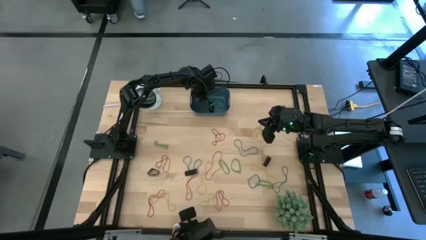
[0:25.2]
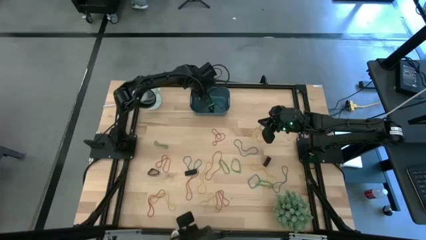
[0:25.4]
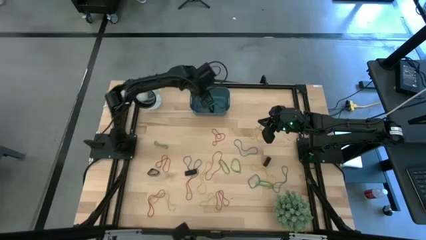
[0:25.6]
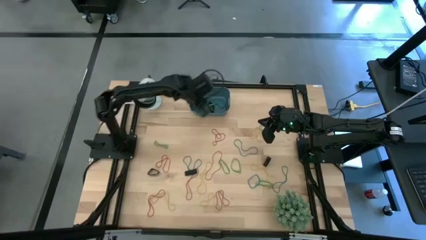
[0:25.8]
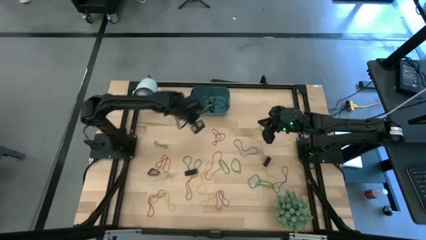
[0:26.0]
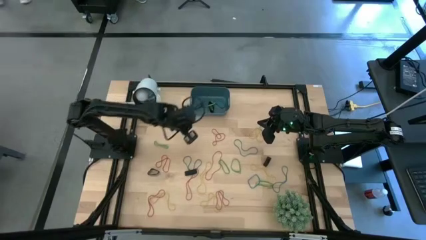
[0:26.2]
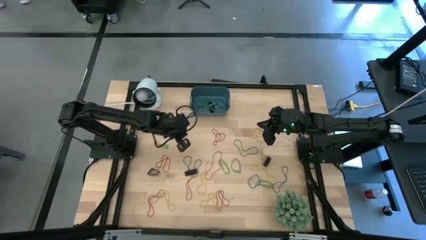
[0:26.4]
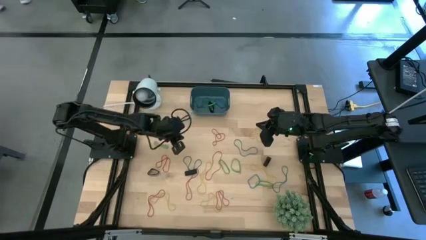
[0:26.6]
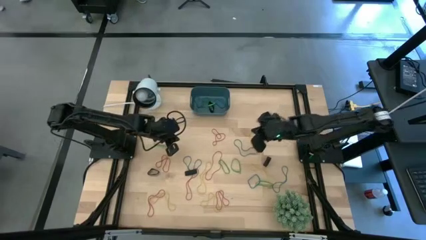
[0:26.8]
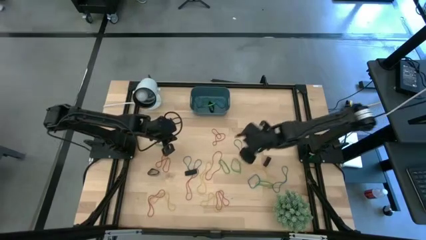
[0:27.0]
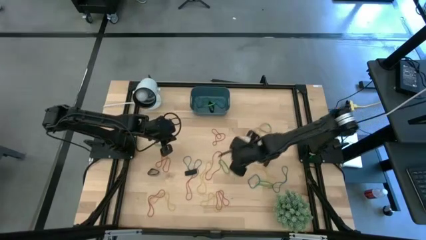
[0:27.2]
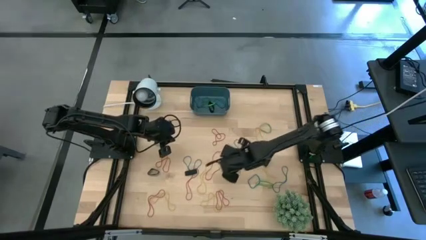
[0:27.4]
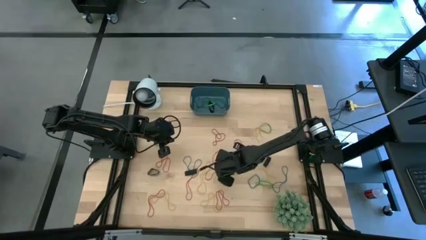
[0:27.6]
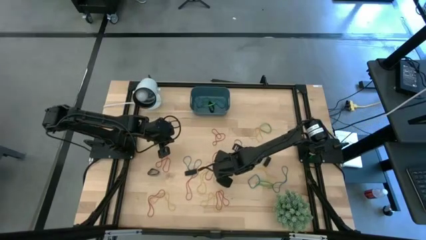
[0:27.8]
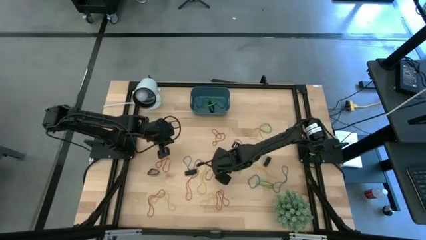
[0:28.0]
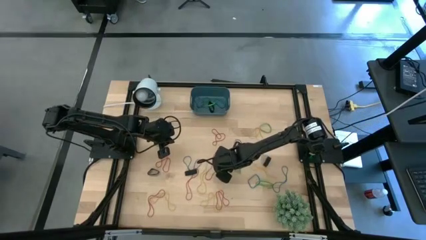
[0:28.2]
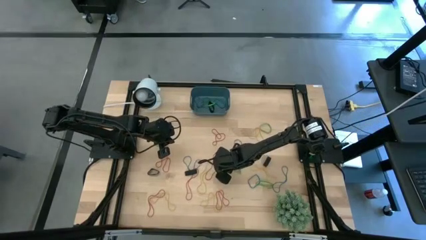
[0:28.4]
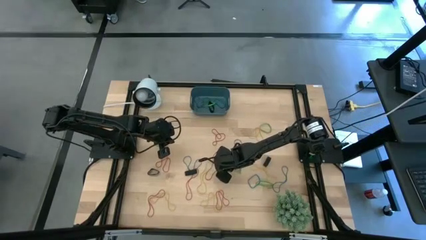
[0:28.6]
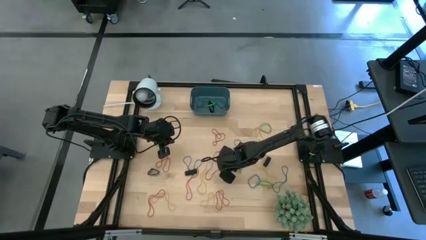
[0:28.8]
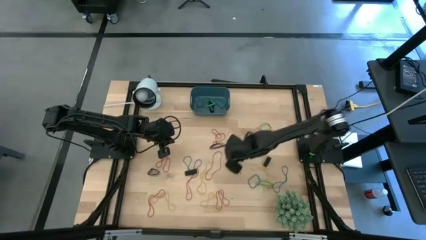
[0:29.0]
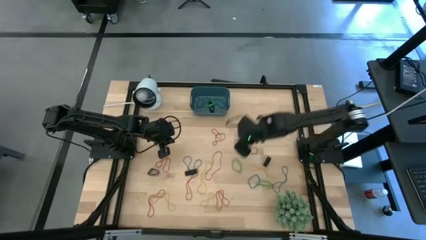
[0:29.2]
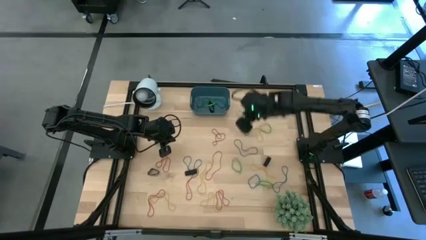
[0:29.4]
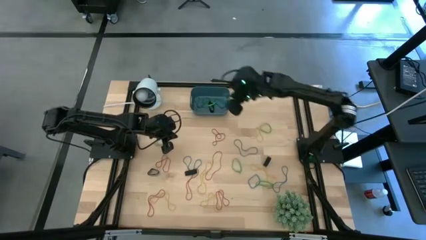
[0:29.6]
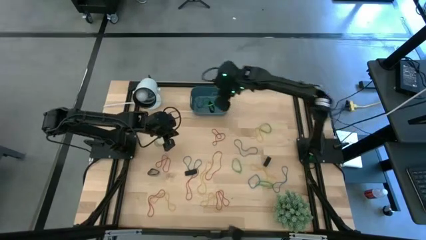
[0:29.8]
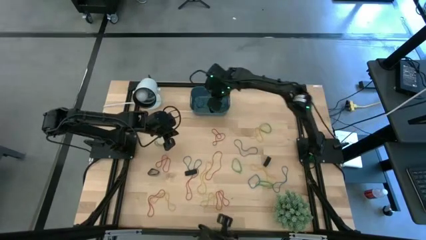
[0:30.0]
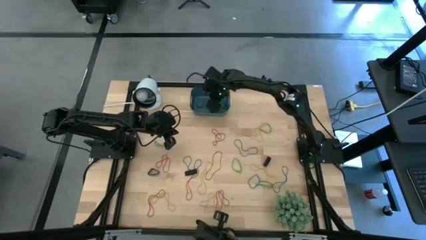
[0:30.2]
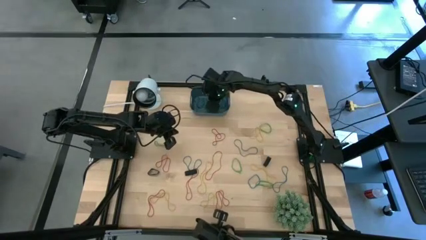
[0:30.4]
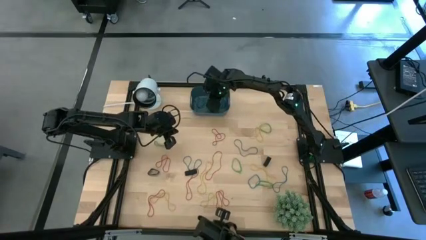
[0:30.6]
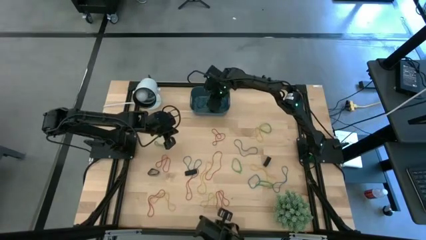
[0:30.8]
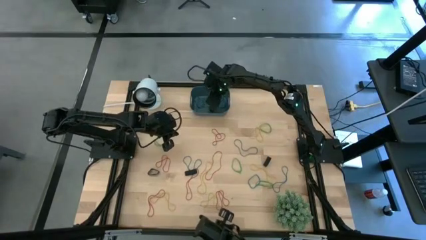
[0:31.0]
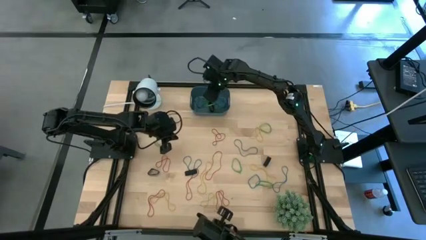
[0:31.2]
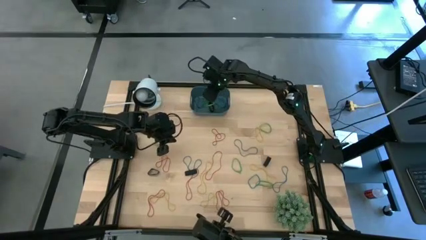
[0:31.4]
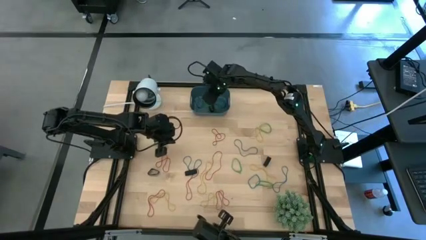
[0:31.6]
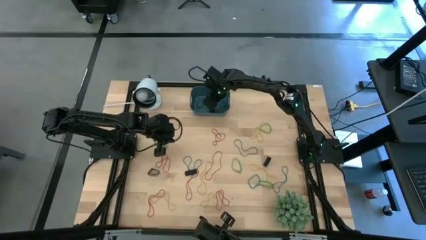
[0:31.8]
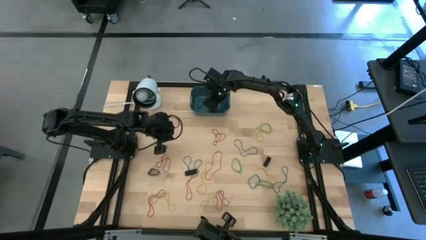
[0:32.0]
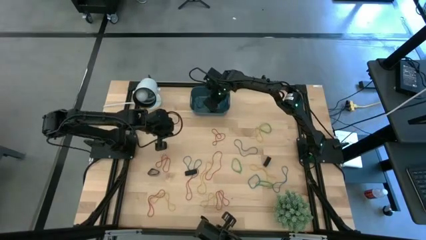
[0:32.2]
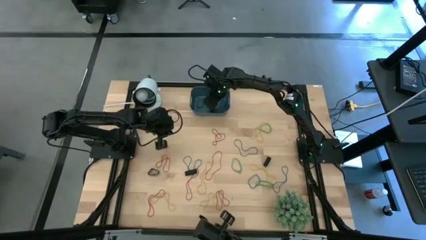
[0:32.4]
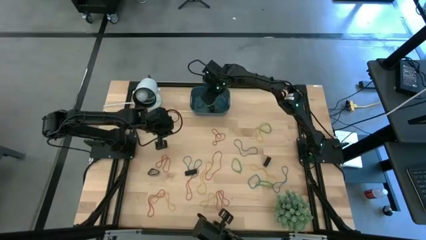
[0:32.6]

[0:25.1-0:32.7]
Task: Pick and place rubber bands into bin
Put the green rubber band into the blue bin

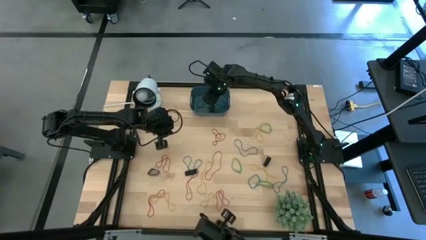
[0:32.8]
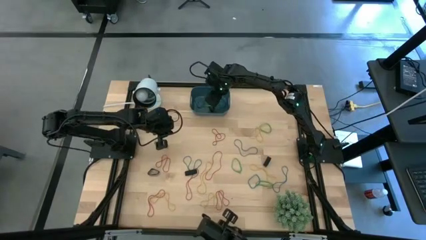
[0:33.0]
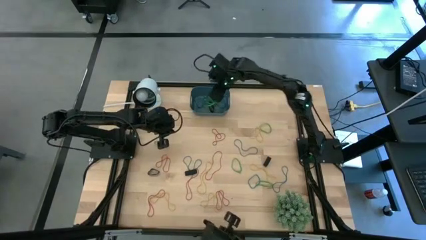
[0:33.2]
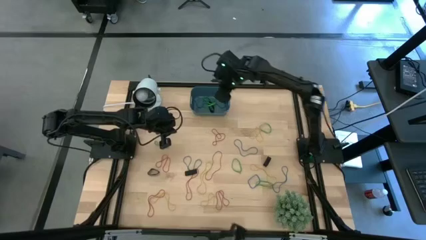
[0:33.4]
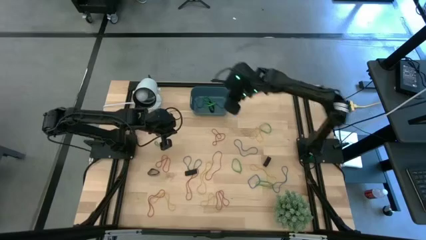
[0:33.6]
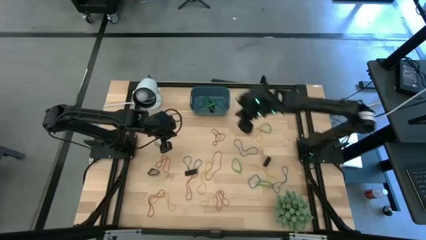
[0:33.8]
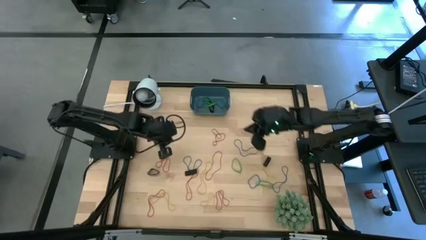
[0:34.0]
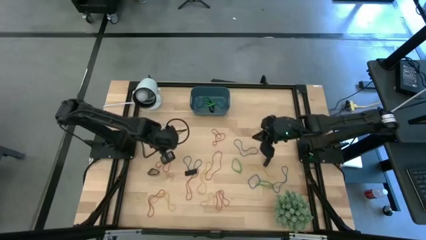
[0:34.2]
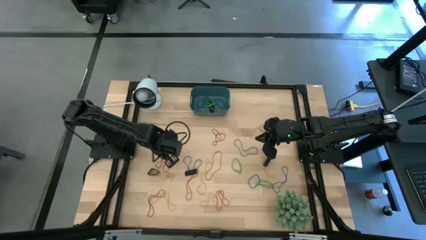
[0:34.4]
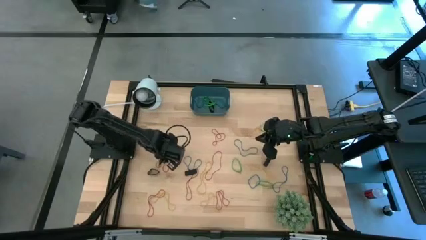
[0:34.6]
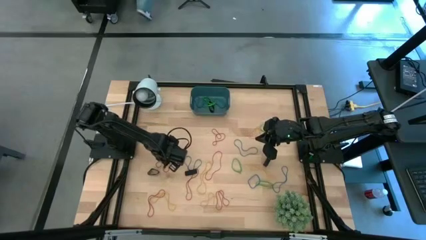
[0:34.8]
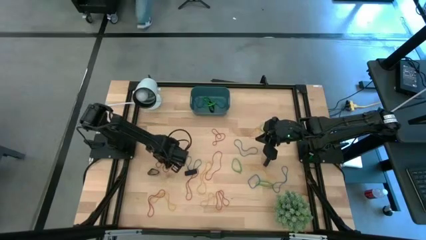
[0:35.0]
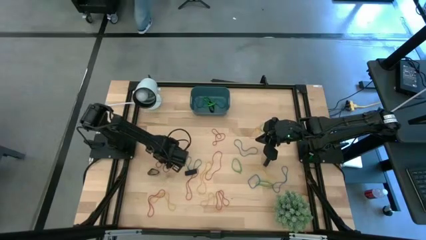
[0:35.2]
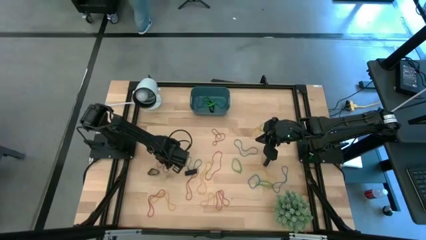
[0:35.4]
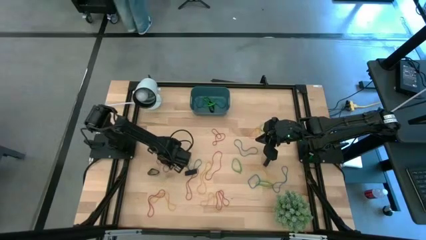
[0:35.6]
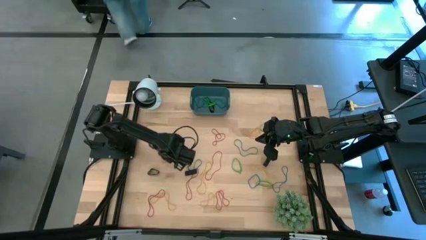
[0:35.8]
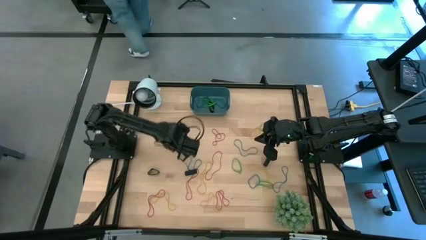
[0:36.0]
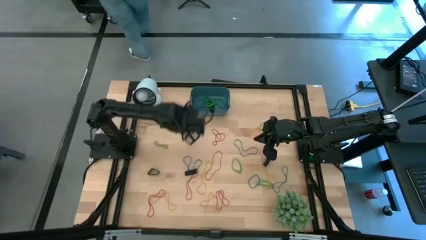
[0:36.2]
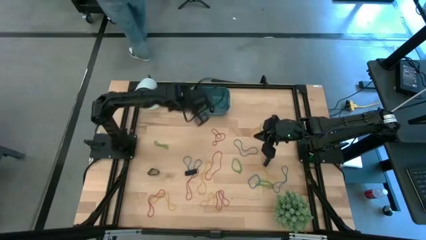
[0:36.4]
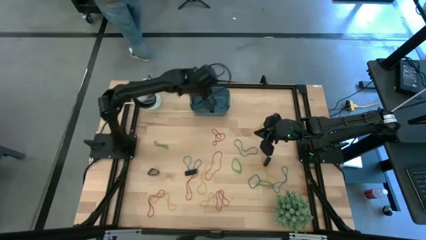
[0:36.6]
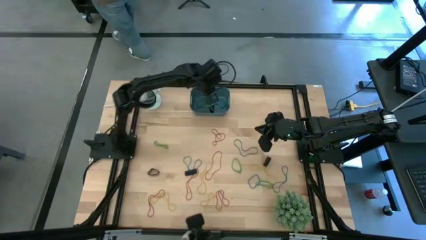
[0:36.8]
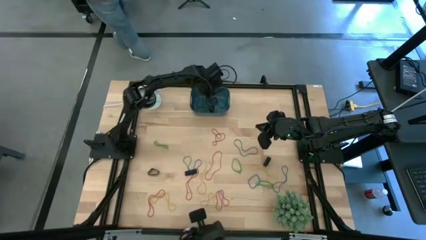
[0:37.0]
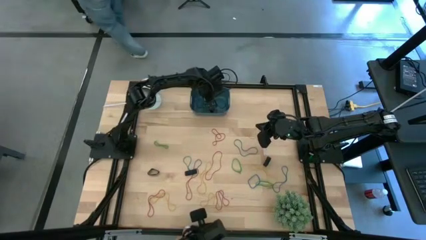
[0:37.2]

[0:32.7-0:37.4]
Put the red rubber band into the blue bin

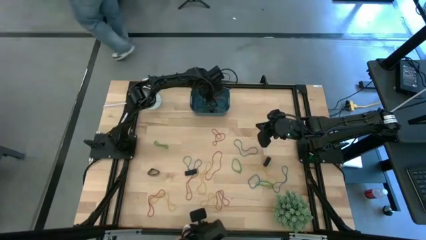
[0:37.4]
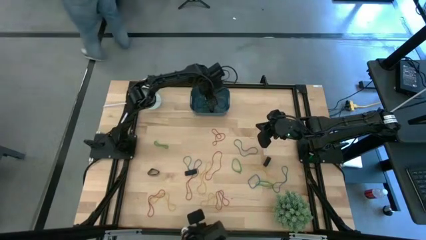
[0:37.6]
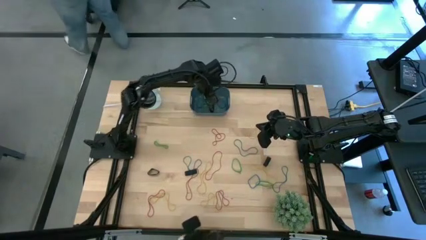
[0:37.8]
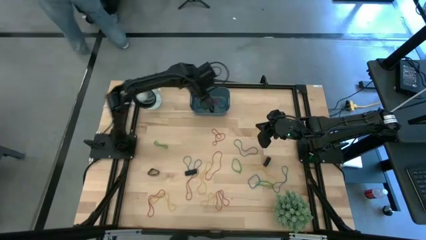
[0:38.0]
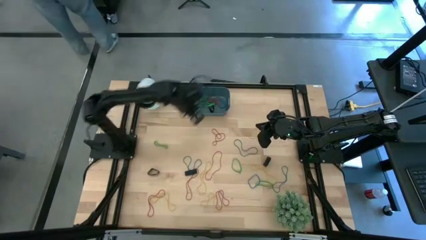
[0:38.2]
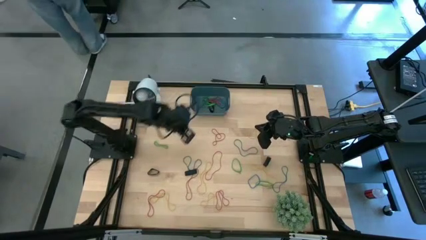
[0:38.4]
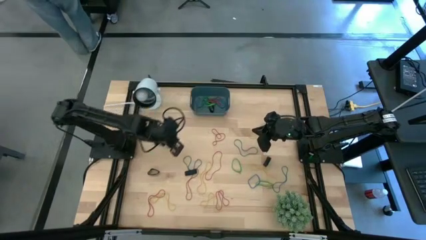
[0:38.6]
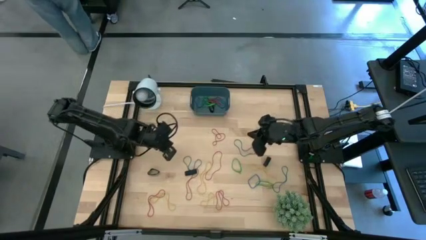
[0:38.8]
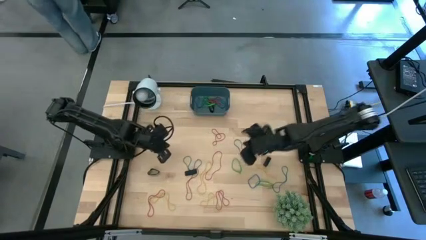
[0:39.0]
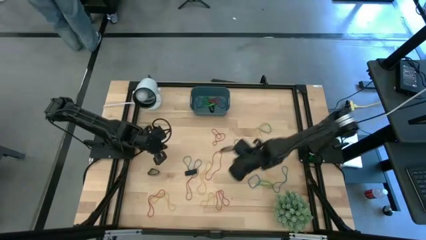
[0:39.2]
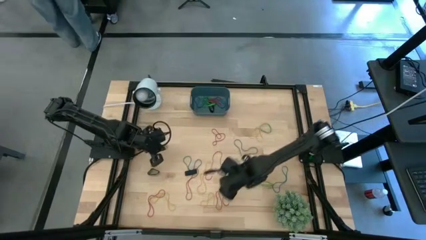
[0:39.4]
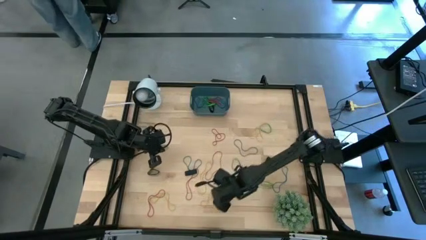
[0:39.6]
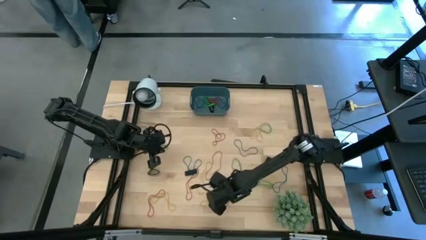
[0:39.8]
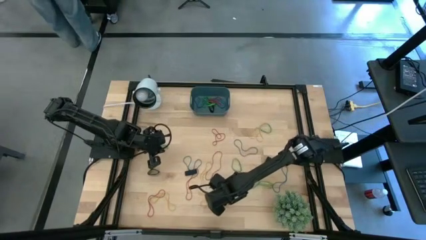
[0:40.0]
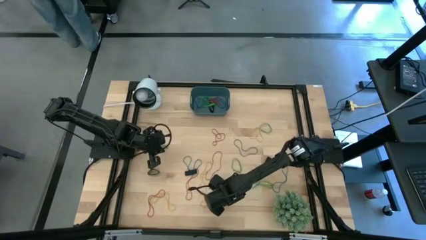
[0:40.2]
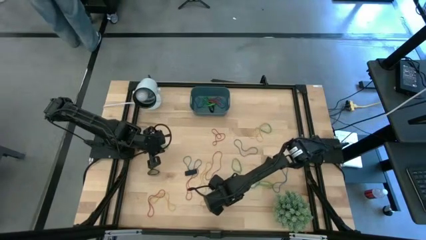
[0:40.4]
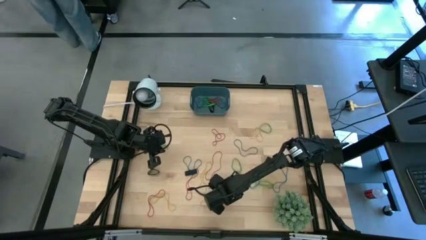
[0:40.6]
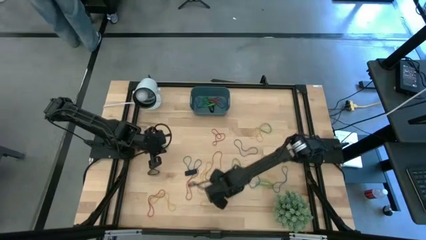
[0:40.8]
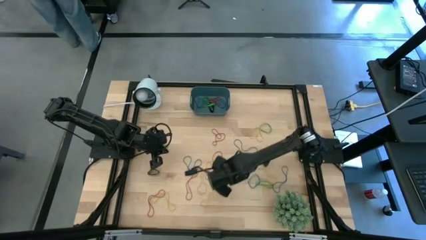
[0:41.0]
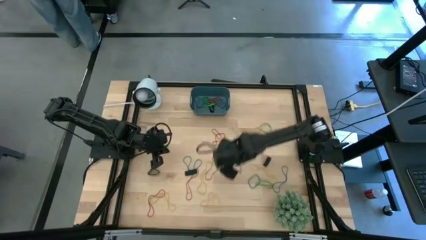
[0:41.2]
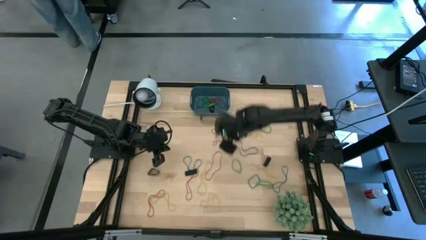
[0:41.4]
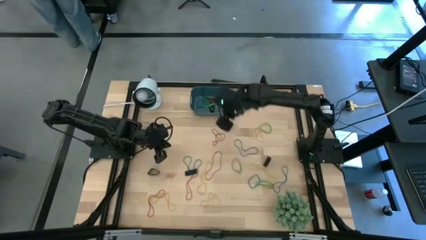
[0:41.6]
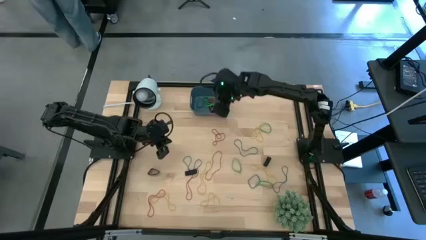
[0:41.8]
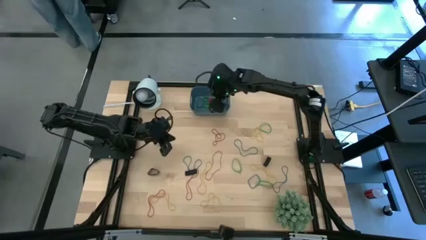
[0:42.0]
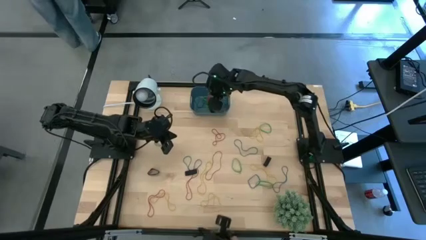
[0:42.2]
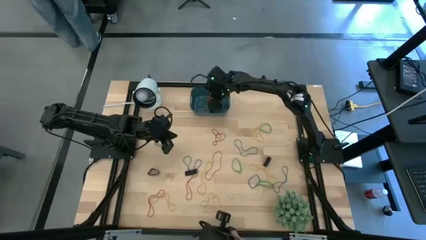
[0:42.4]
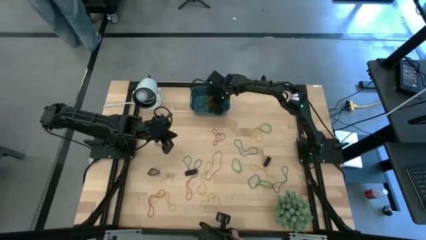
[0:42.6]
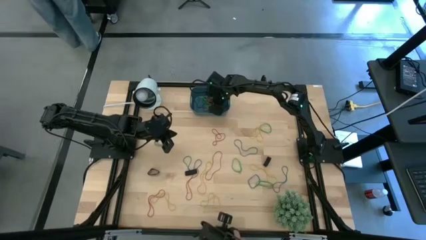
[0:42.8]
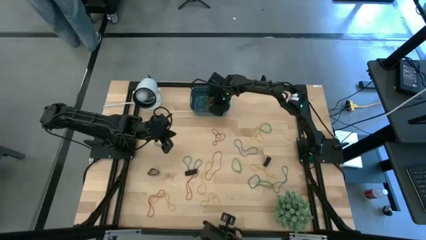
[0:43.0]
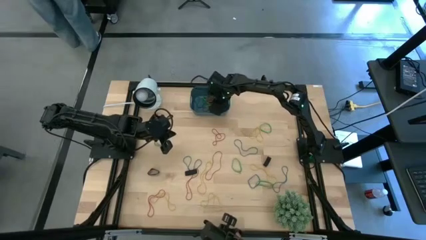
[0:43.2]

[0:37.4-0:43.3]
Put the red rubber band into the blue bin
